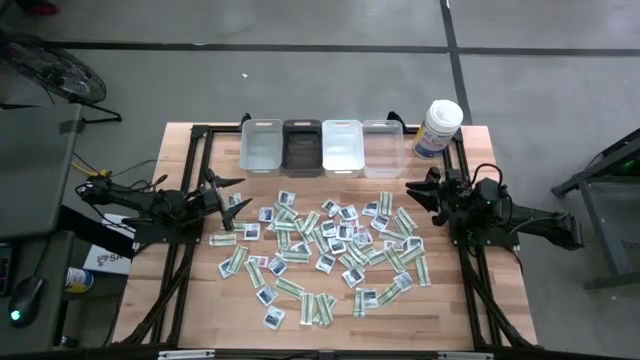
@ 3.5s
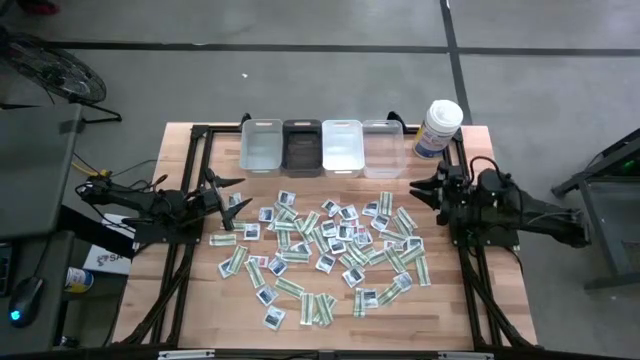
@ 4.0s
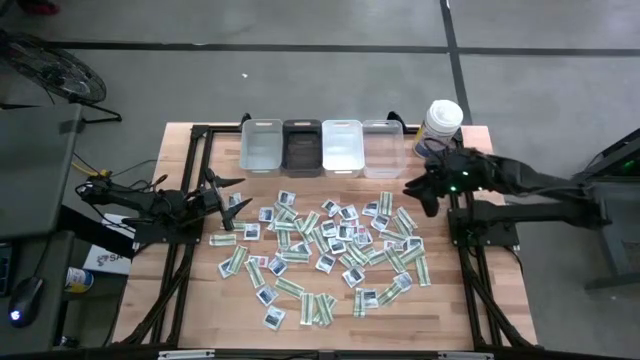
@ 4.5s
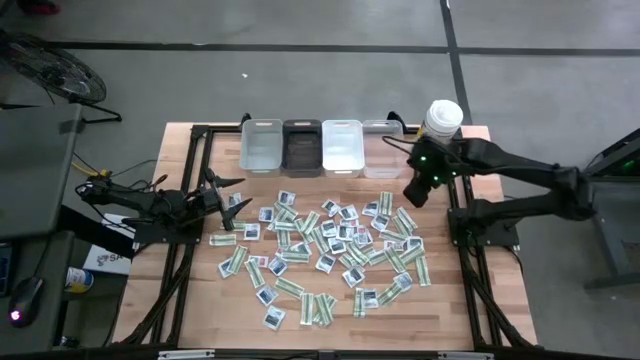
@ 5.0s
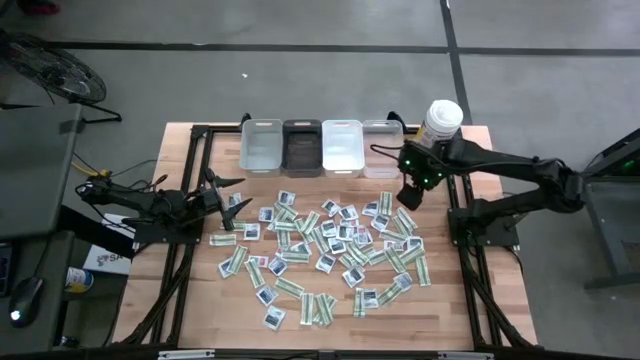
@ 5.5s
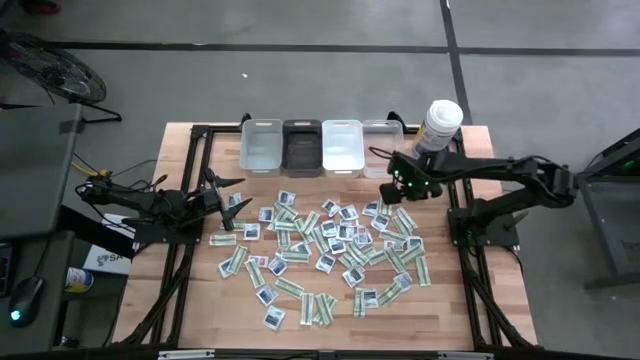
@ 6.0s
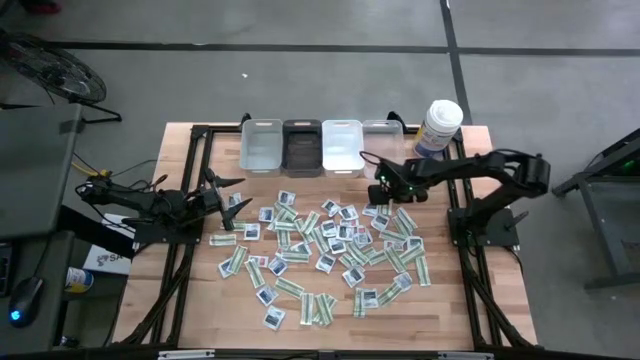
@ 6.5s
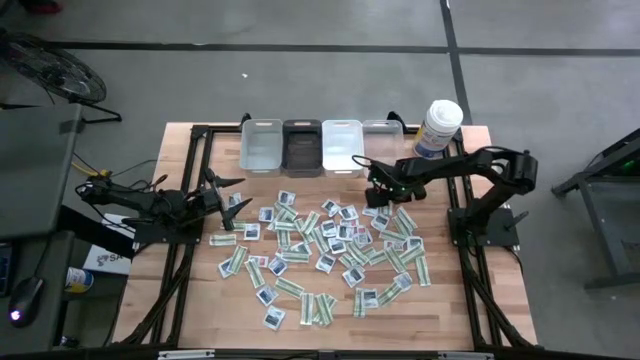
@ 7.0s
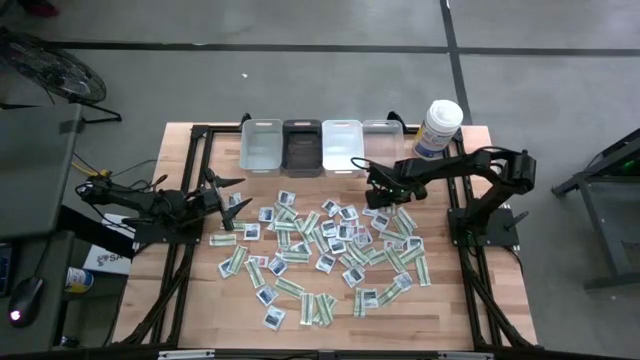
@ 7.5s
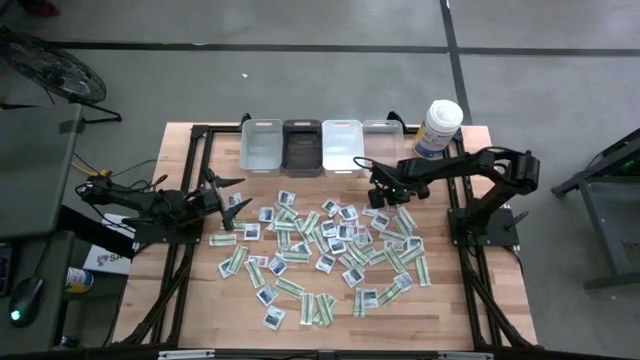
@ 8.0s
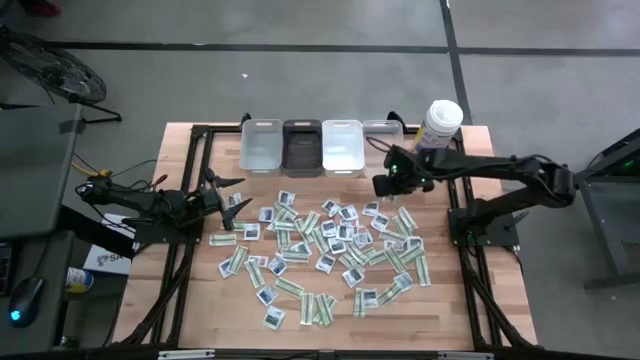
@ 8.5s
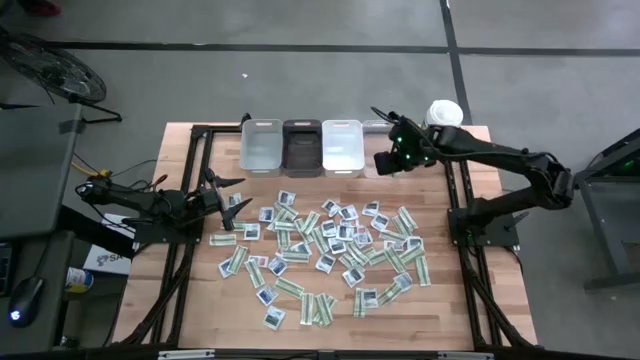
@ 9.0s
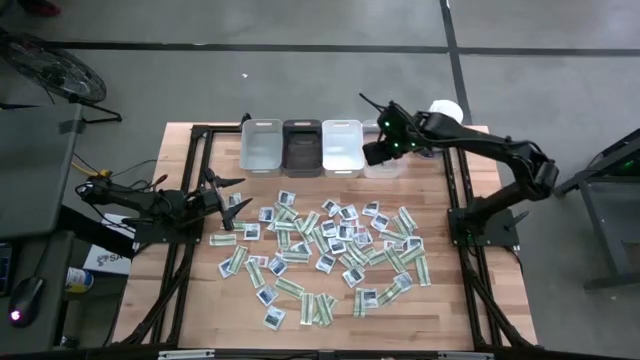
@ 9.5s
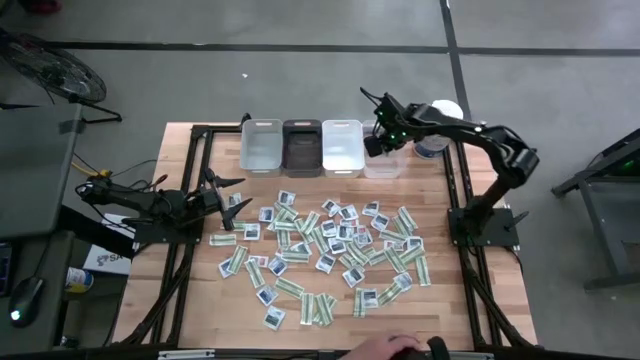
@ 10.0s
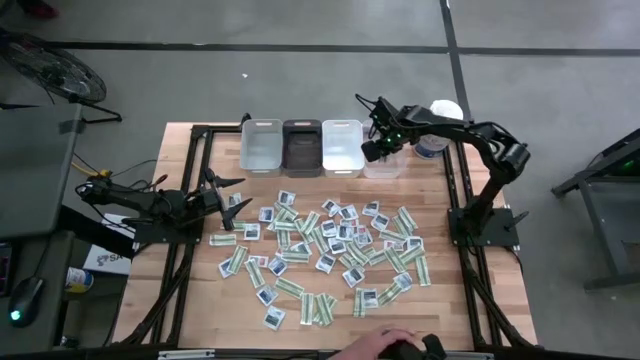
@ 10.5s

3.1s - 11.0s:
Task: Pick & Place First Aid Supplies
Put the green bandage into the transparent bin

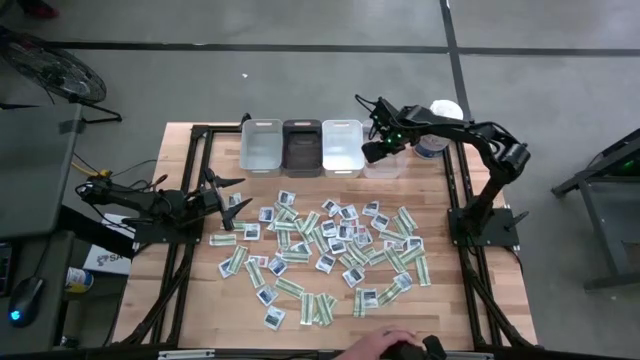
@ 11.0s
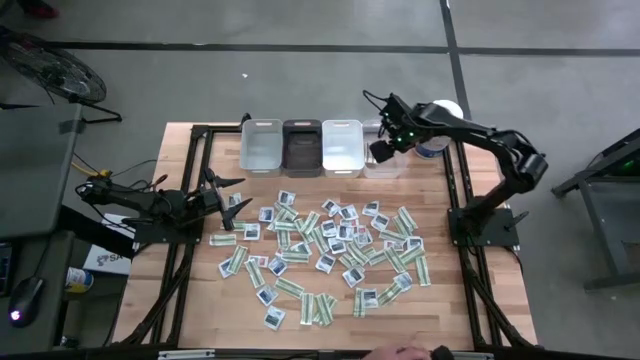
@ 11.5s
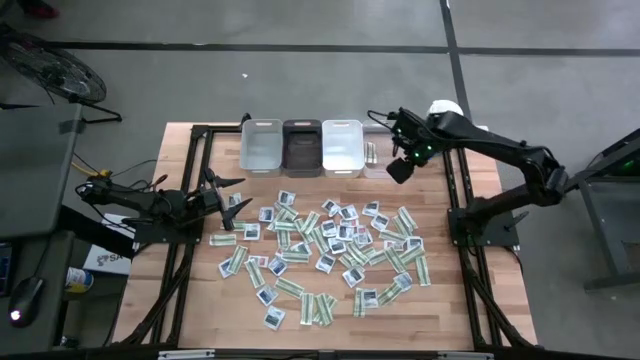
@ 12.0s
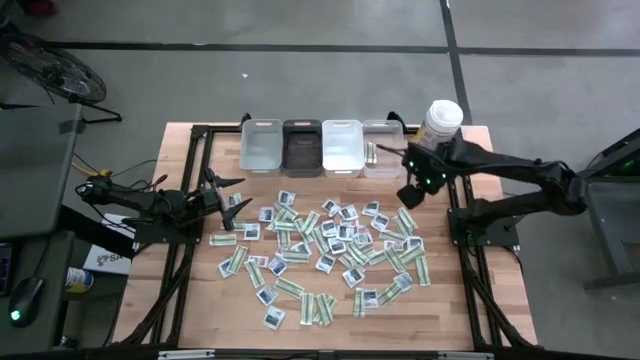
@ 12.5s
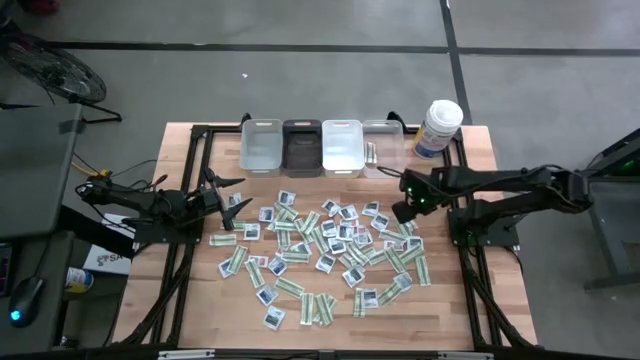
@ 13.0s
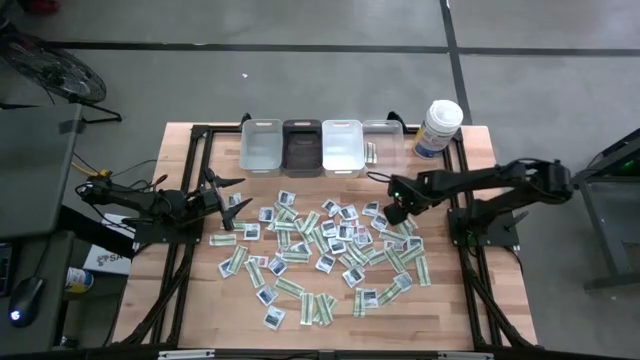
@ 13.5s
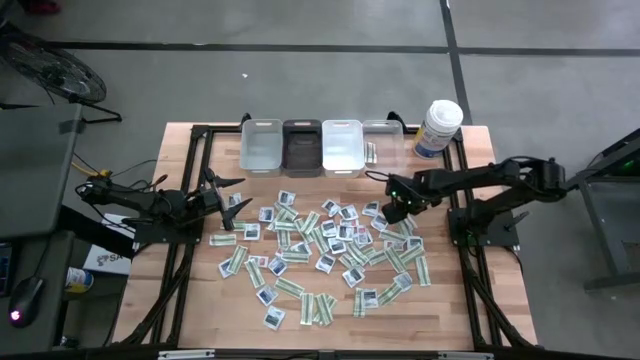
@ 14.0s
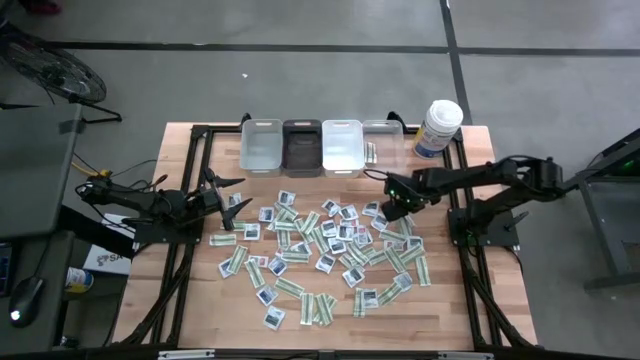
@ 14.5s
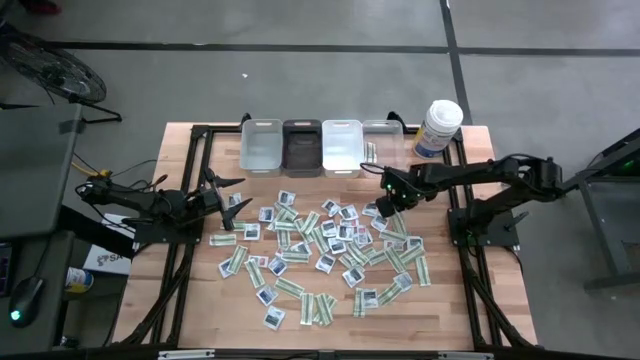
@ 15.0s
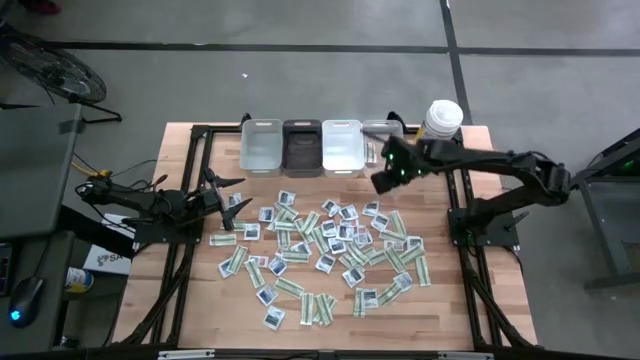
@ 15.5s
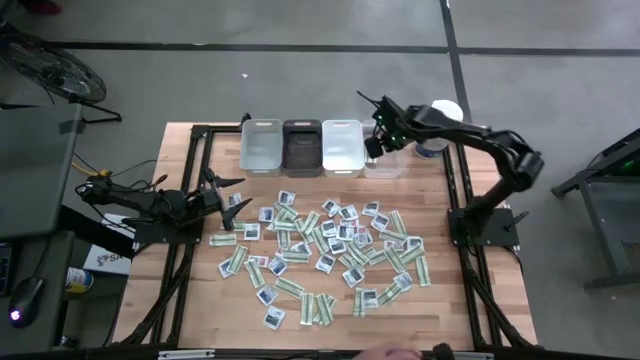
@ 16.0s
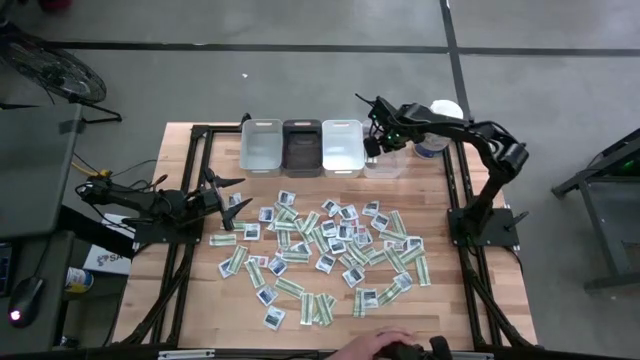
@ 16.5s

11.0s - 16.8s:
Put the green bandage into the transparent bin

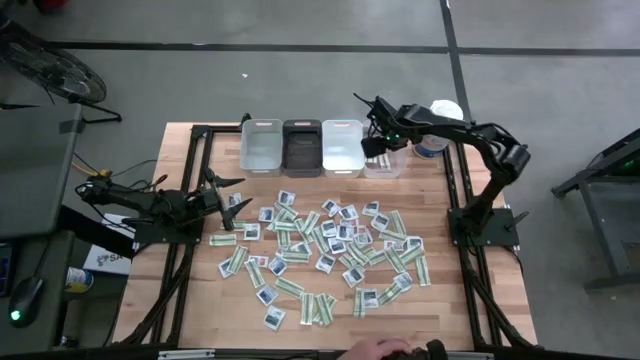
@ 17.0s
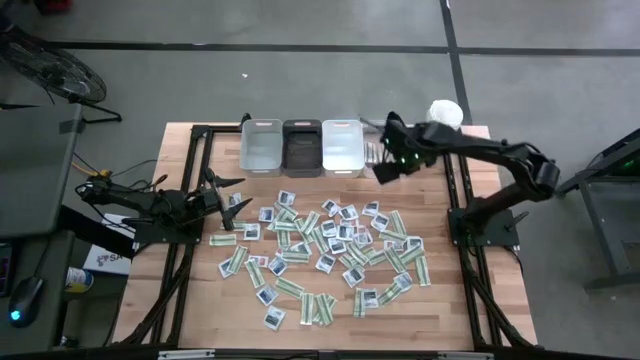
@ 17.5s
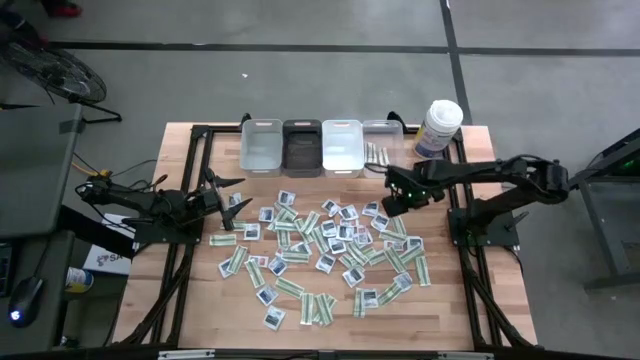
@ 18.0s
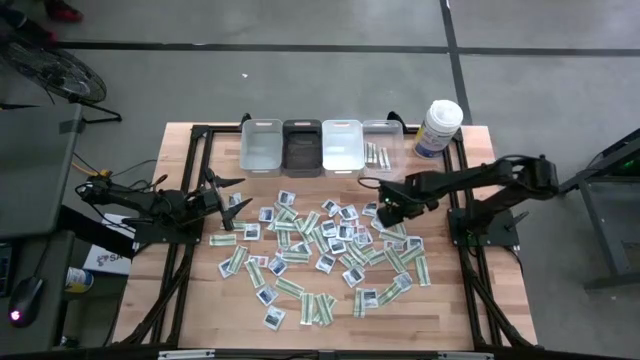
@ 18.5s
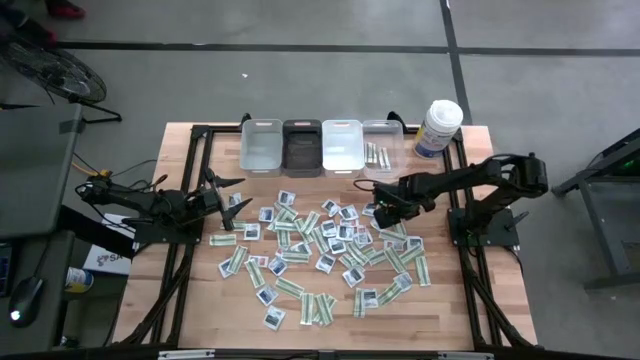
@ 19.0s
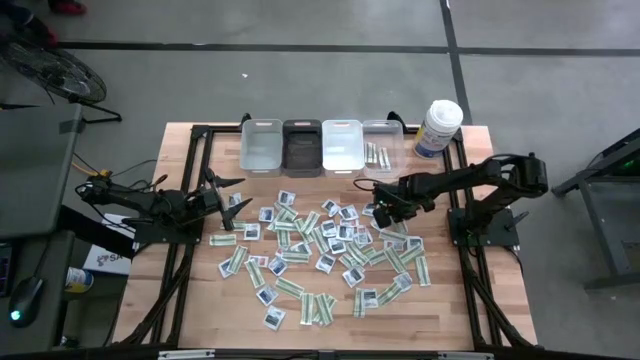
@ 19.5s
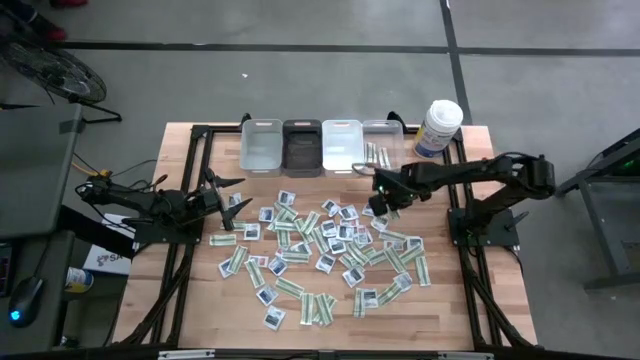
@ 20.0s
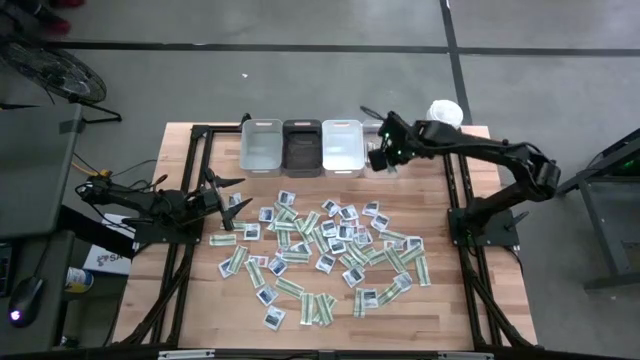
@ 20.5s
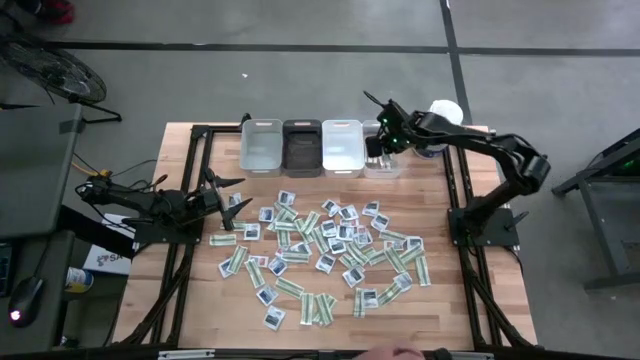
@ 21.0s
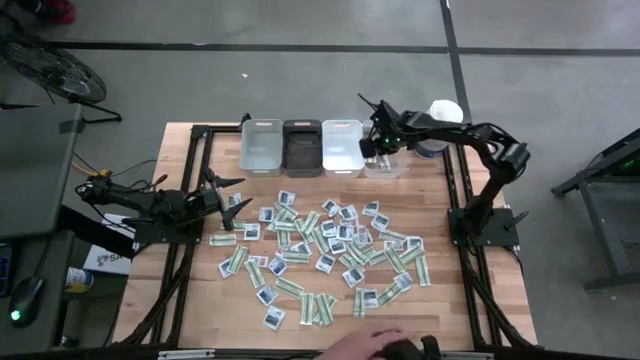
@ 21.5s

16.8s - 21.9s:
Put the green bandage into the transparent bin

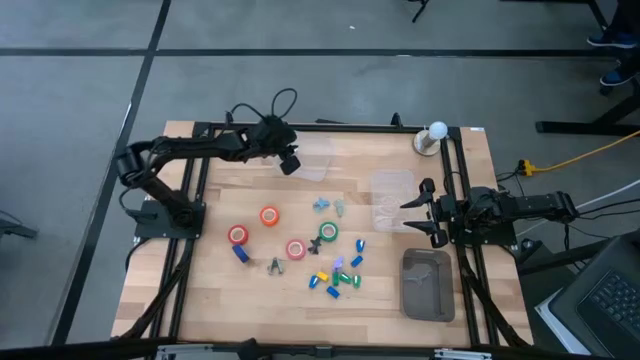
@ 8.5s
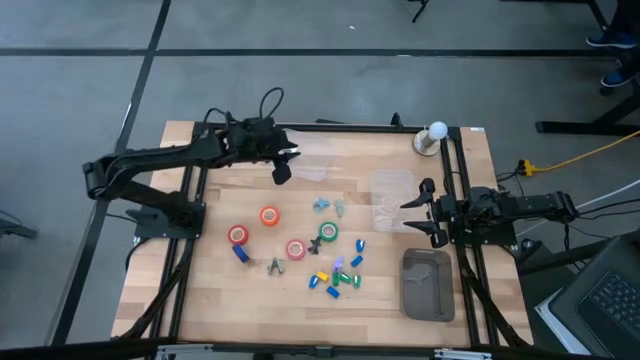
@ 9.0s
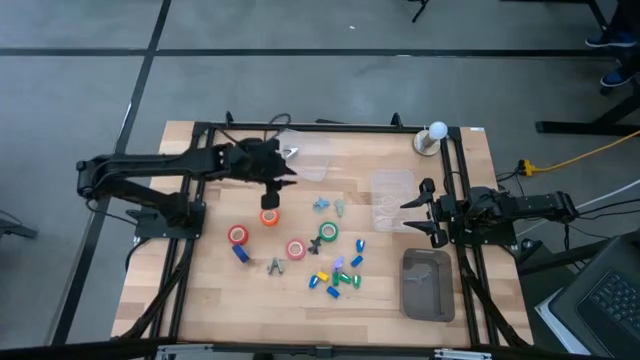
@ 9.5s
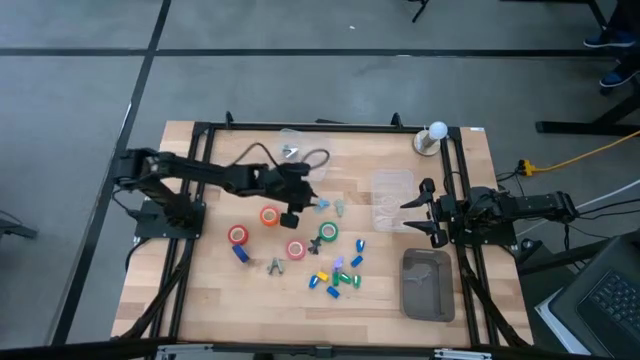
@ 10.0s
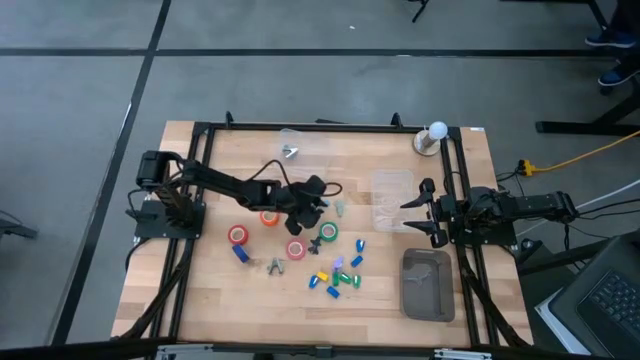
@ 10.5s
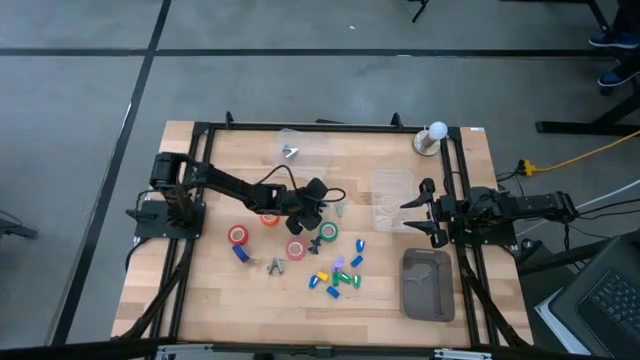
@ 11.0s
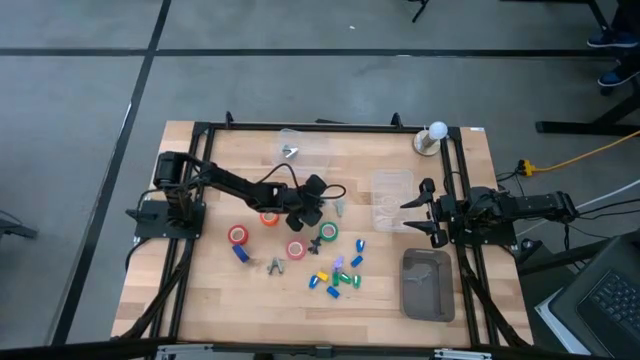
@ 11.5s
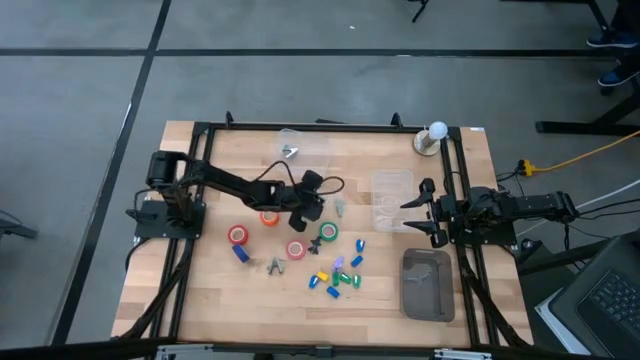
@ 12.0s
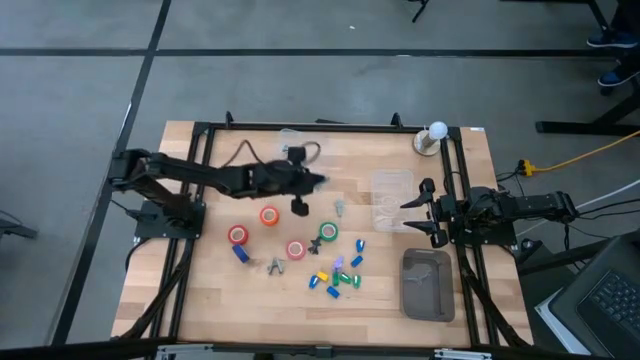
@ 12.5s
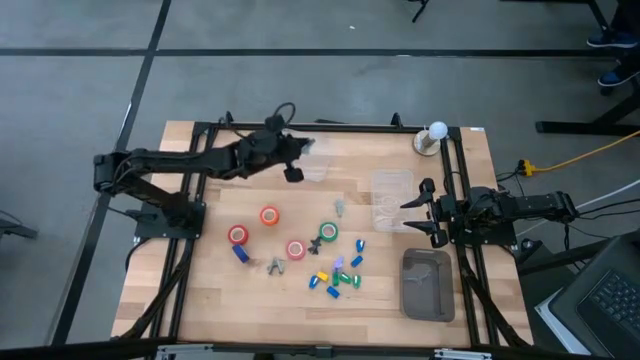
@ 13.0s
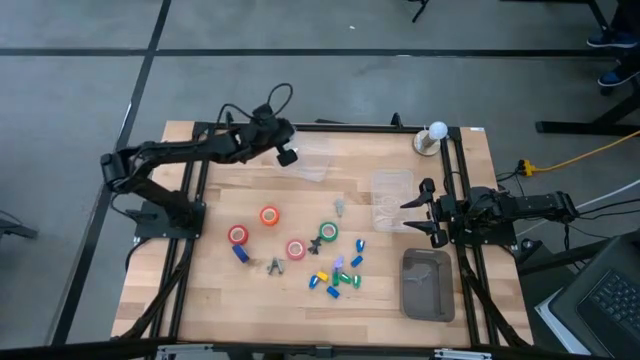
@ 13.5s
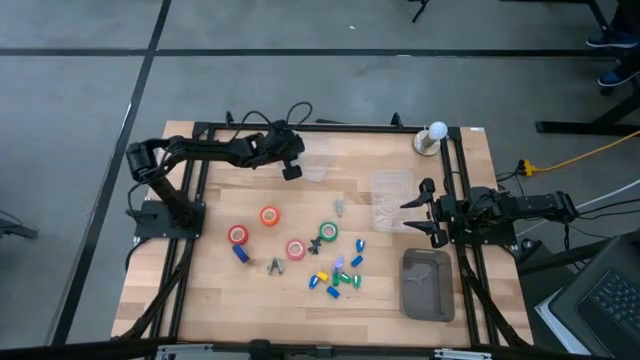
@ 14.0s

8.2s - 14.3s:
Task: Pick and place Stapler, Stapler remover, tape
Put the light blue staple remover into the top transparent bin
